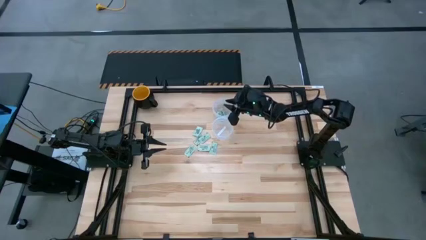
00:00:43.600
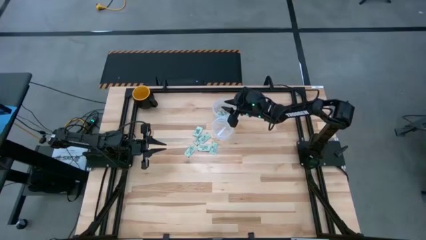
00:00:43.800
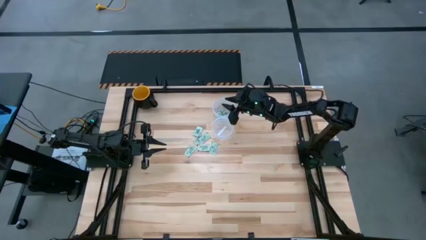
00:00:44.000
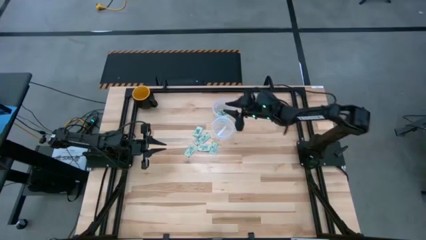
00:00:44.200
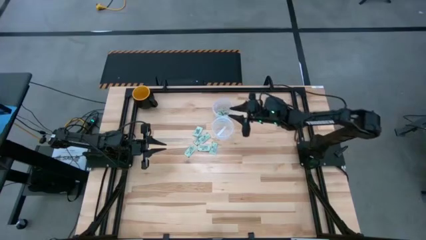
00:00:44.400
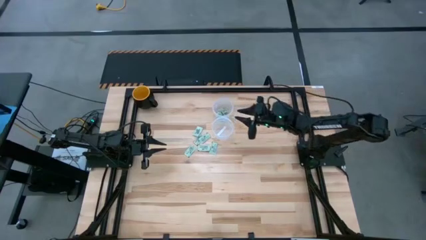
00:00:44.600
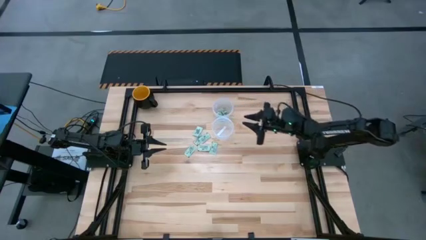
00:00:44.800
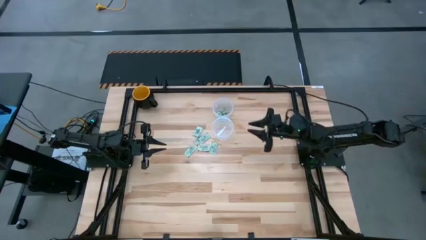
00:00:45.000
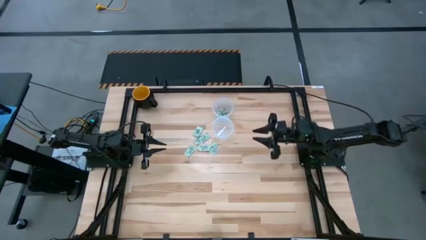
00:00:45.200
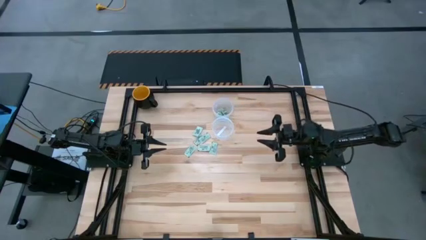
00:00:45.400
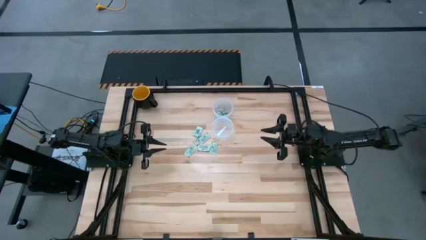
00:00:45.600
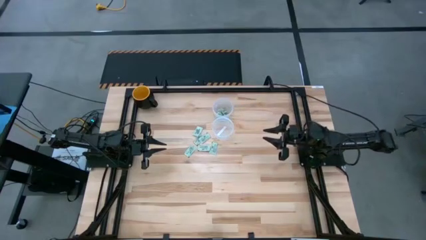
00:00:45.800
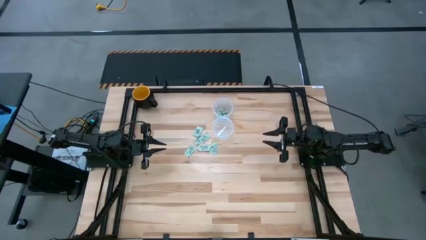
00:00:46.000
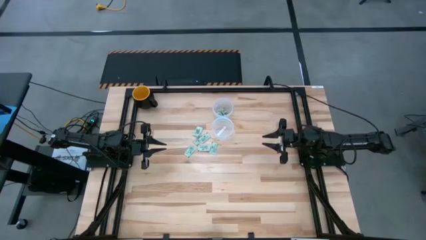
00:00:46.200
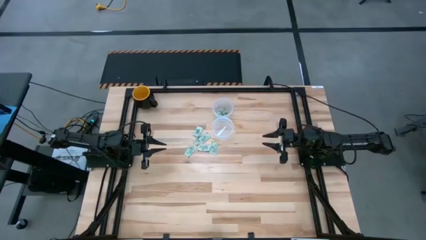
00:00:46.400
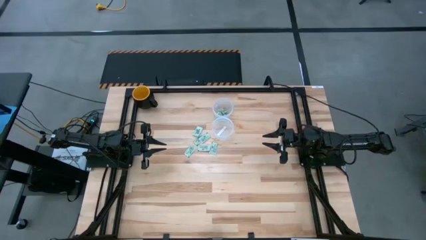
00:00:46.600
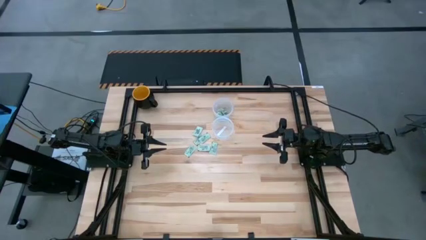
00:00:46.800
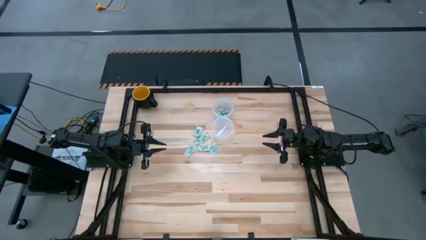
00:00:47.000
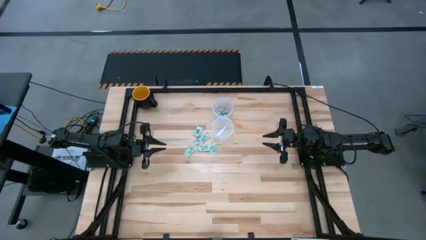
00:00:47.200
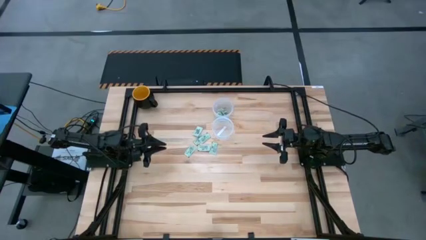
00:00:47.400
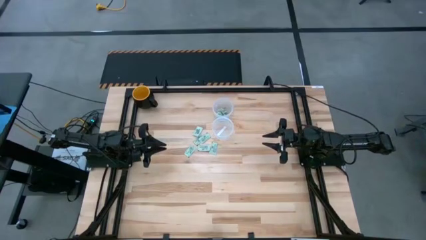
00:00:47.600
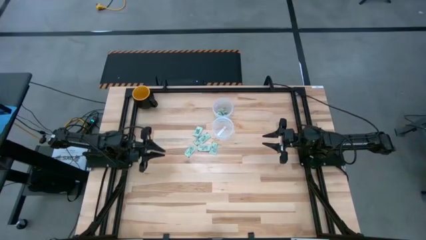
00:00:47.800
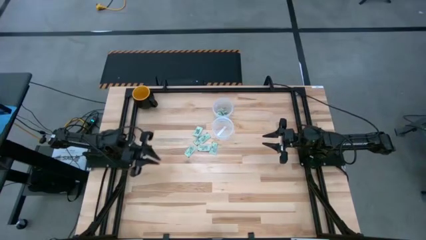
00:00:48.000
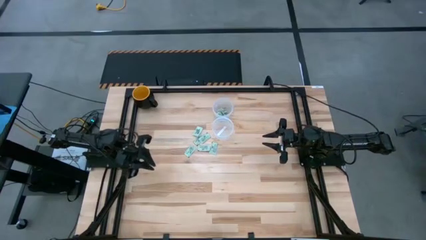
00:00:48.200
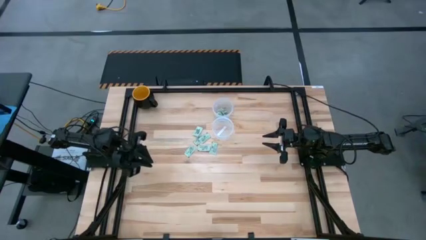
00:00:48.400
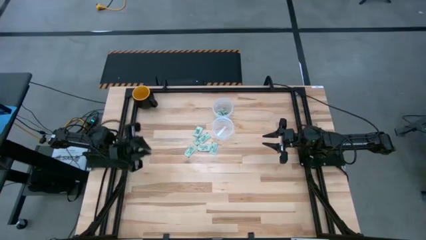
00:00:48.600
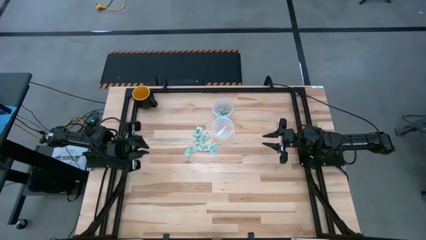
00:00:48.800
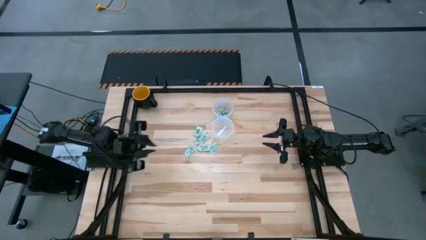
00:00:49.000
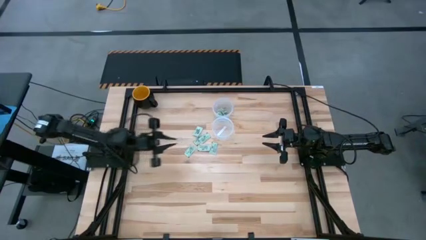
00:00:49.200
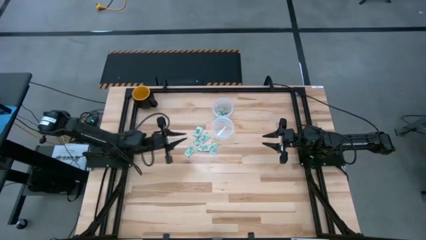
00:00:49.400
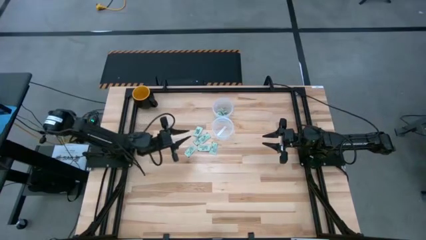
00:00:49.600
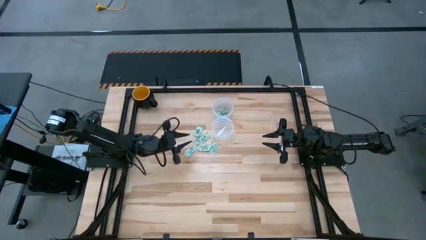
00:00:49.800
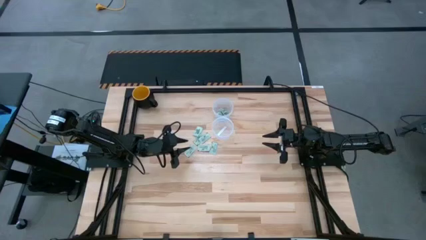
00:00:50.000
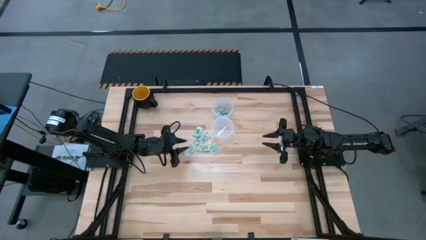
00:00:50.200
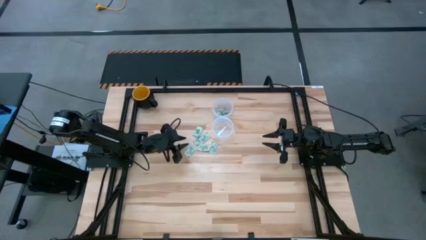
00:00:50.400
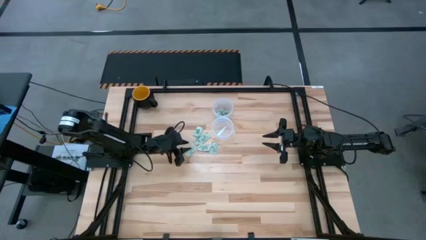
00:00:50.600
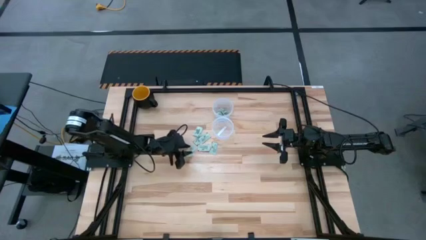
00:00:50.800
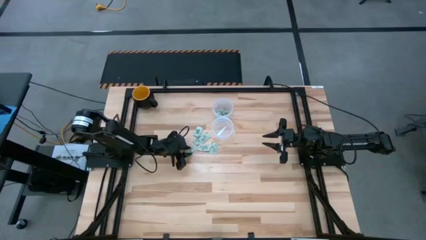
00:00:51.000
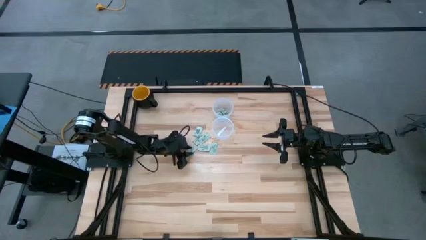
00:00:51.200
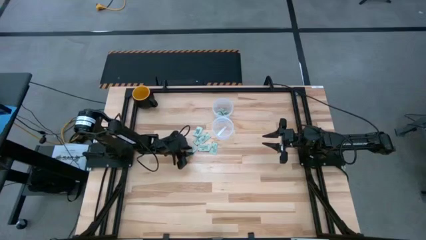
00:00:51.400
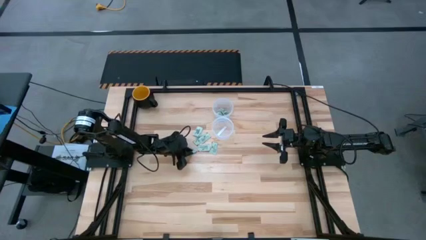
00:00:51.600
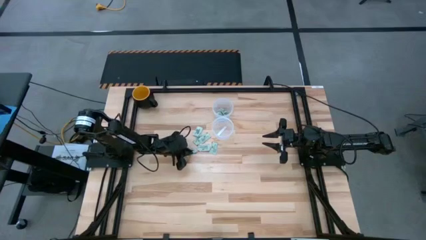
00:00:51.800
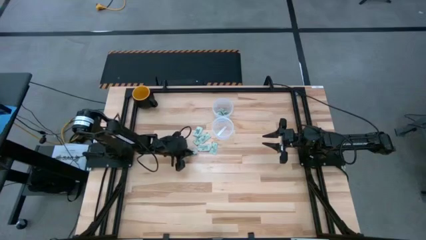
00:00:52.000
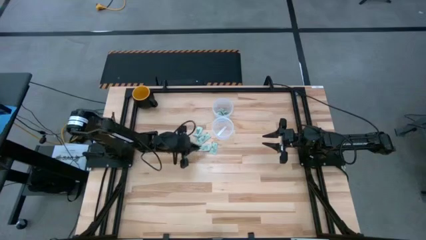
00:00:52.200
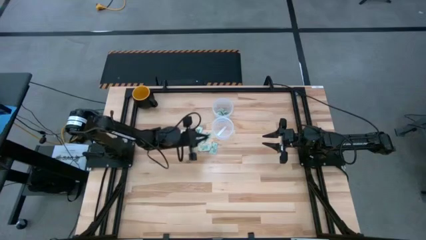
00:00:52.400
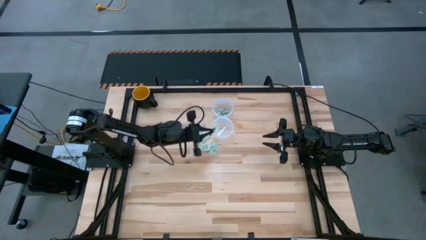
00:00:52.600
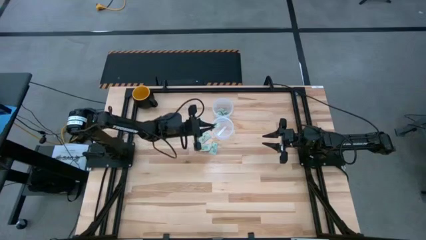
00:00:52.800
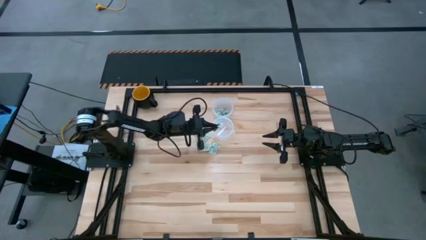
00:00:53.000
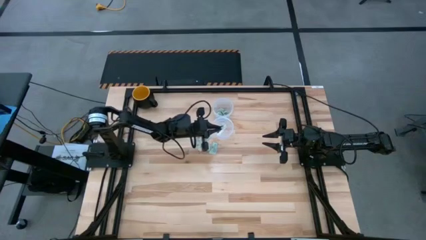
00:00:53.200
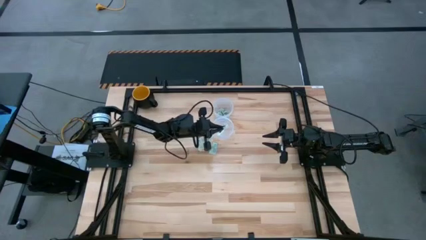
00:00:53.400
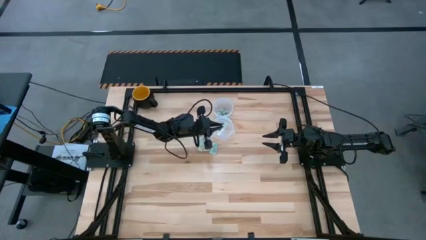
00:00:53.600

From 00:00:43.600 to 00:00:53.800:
Task: Pick and place items into bin
Put the green stevia packet into the bottom transparent bin

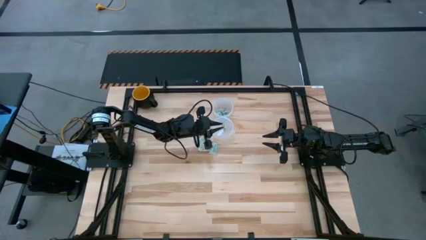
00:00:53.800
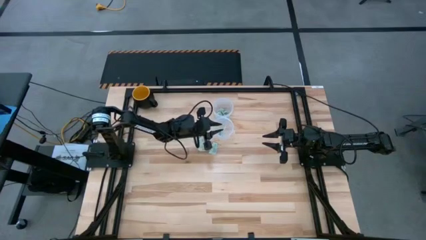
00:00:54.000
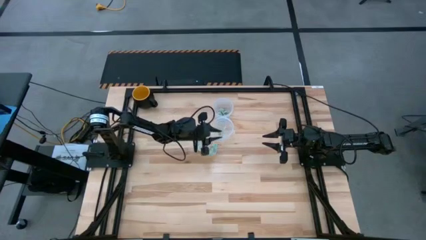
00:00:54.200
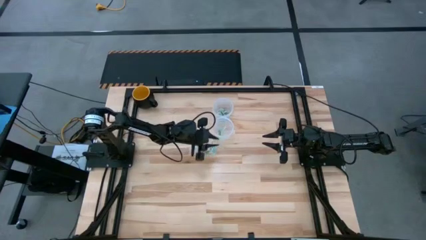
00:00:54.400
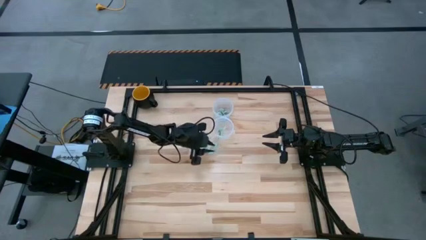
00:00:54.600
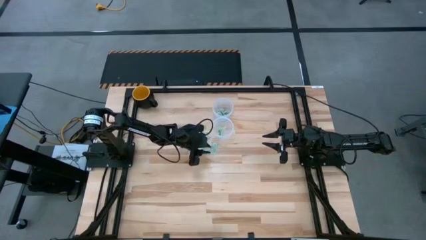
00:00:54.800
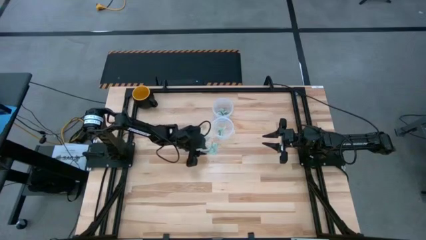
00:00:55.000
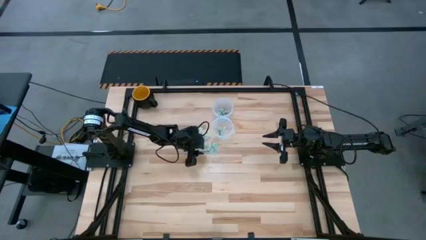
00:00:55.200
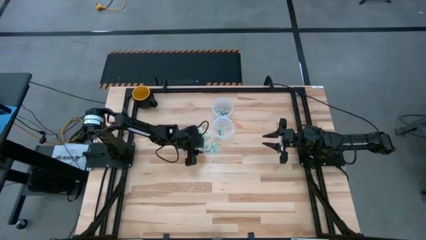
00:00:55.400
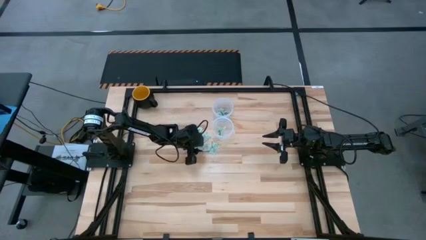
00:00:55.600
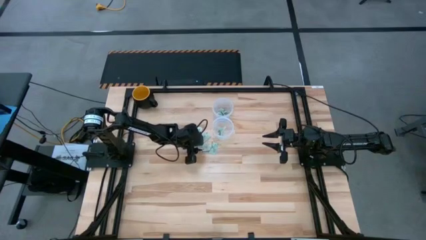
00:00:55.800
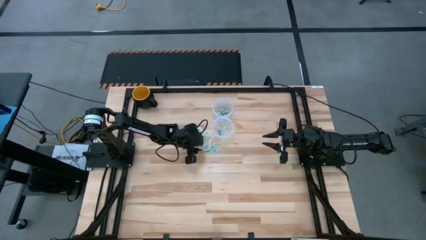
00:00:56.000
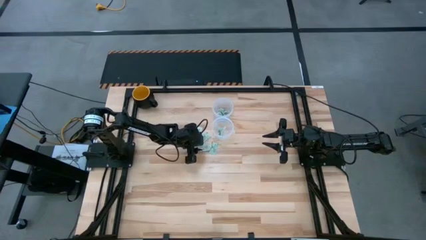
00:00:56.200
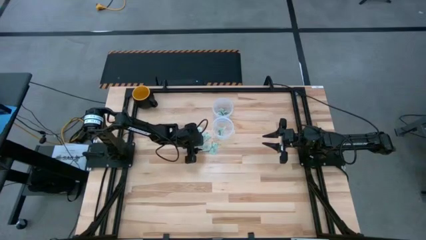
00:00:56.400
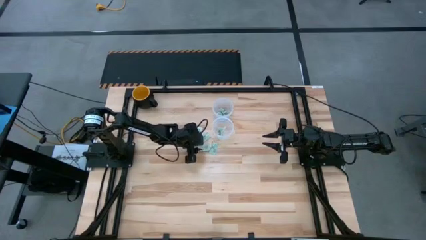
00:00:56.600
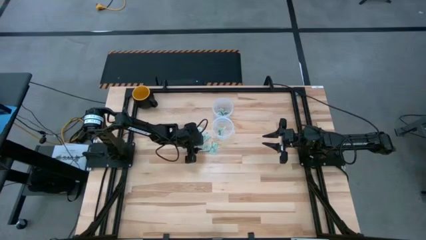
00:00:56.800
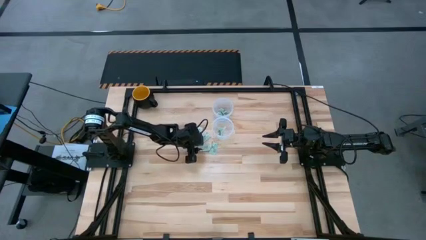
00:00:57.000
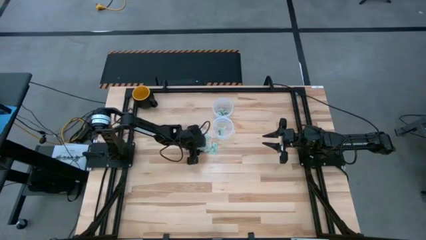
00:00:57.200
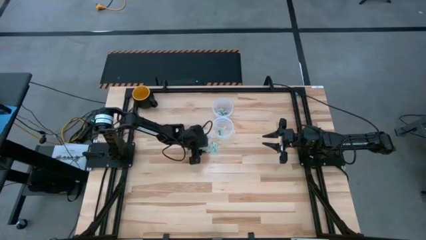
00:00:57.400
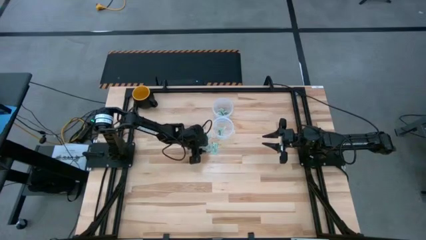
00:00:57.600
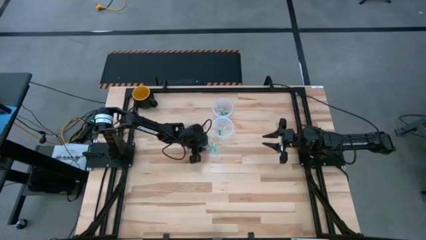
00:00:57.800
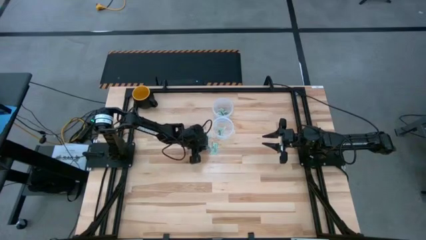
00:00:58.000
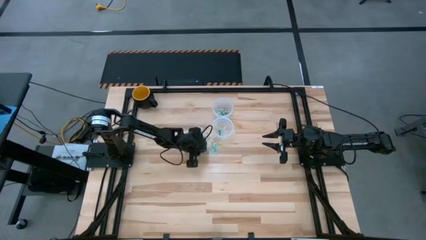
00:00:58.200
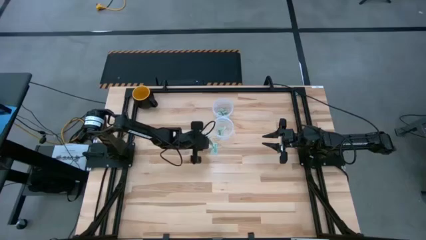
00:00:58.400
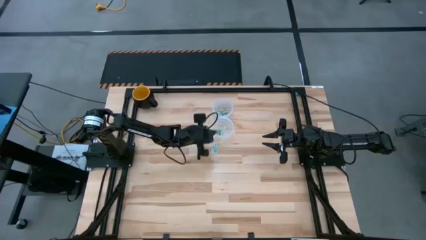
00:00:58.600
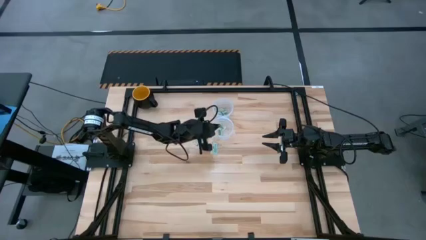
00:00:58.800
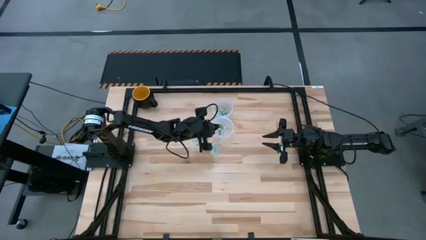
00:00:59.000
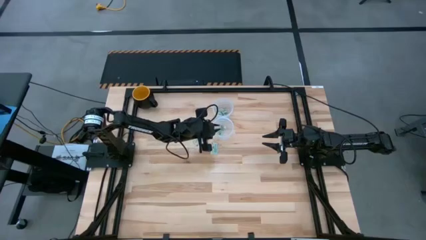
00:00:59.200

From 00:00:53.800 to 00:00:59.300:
Put the green stevia packet into the bottom transparent bin
